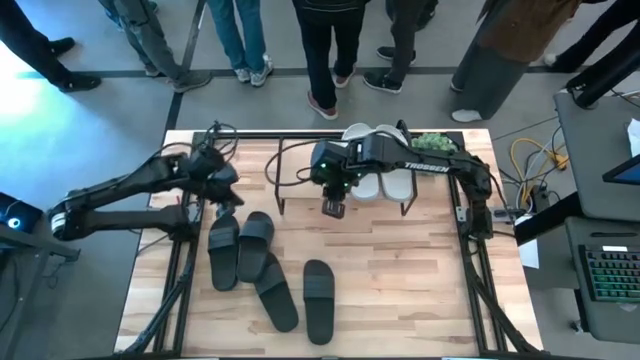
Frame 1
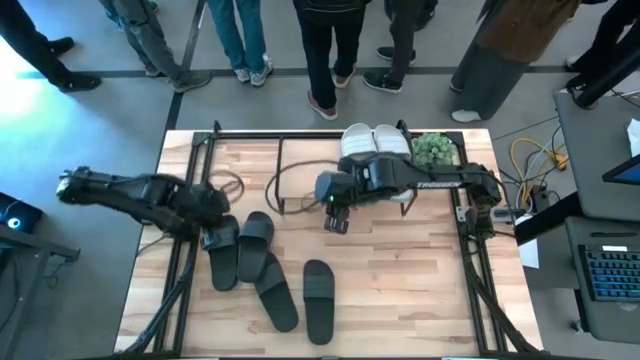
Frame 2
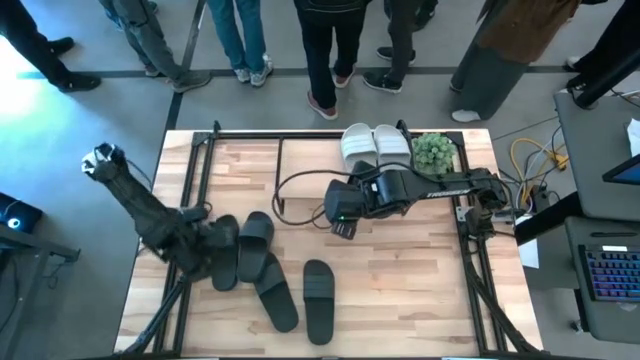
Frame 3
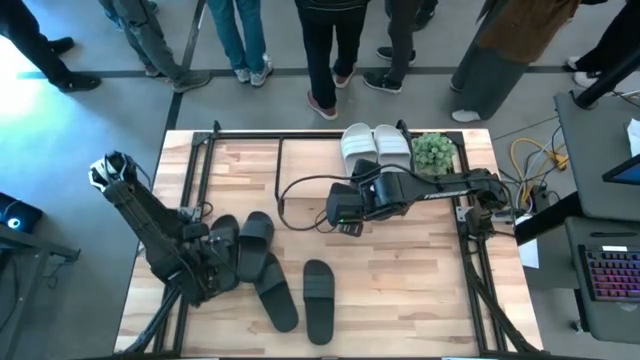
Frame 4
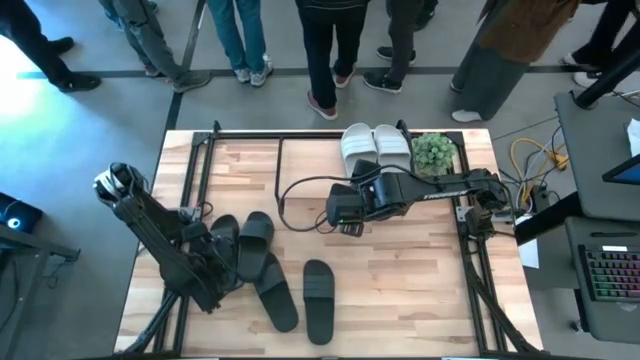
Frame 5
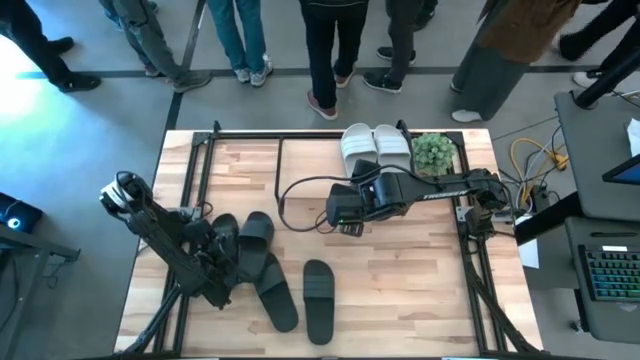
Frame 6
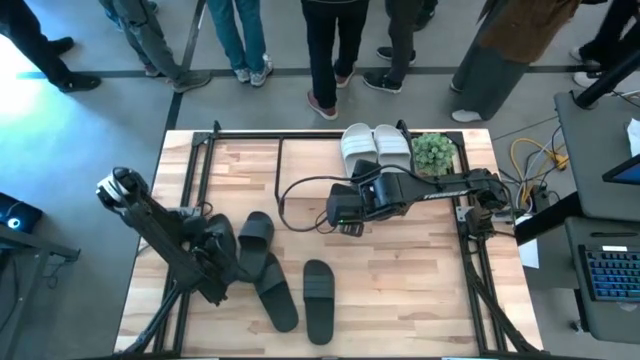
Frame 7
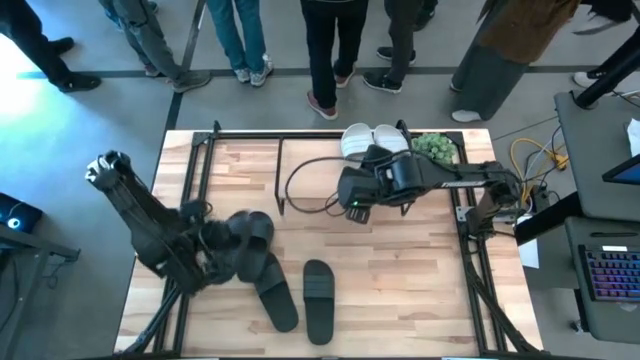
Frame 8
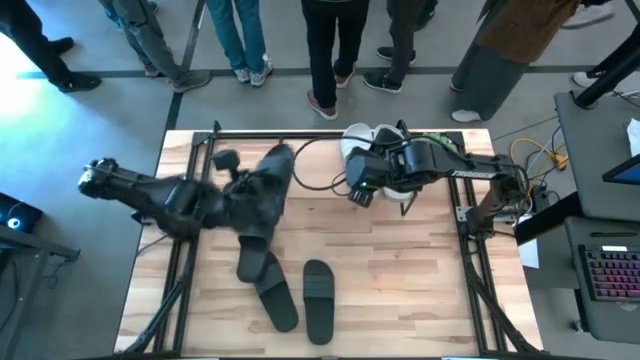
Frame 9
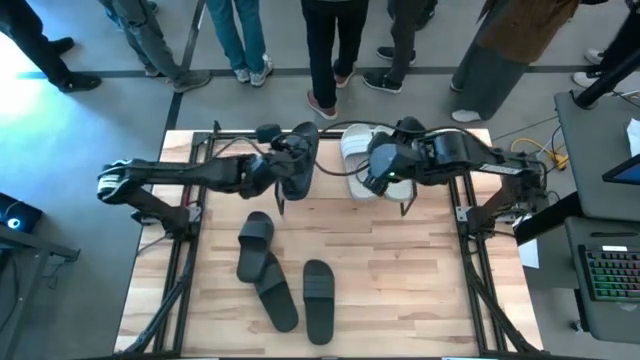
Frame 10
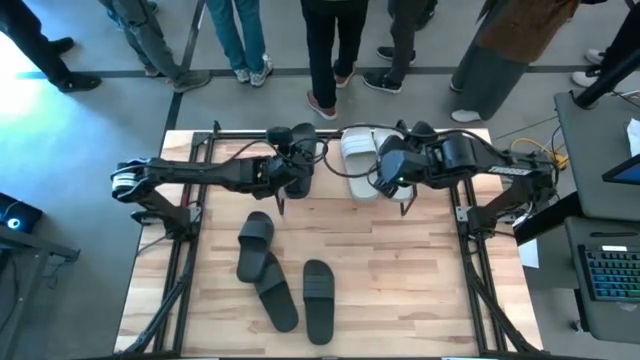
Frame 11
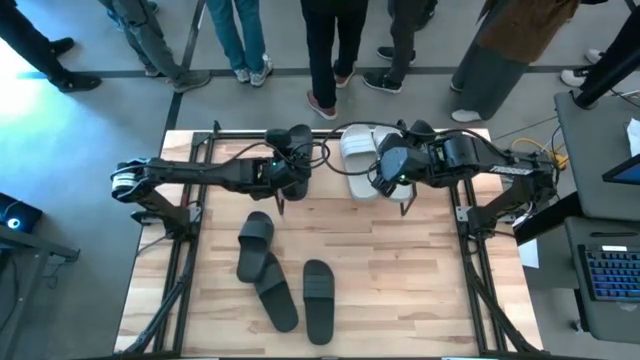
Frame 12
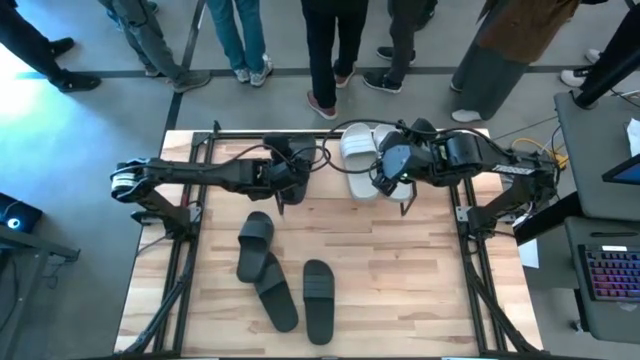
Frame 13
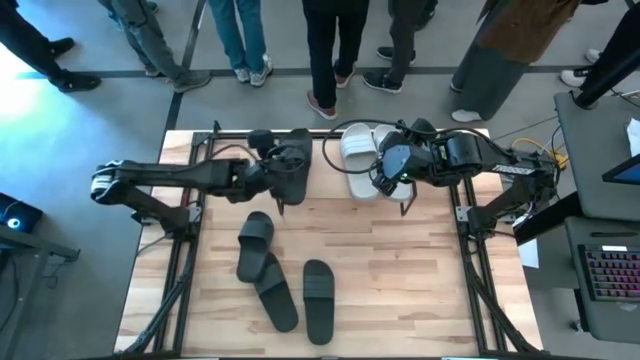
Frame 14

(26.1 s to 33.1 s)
Task: Pick and place slides into the shelf
Put the black slide on the shelf

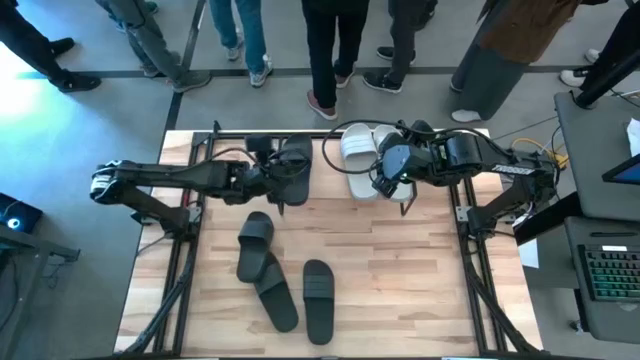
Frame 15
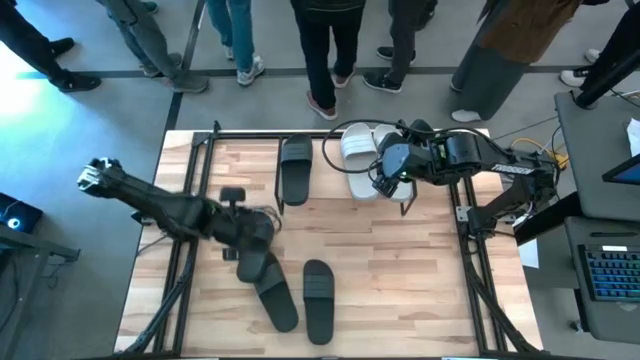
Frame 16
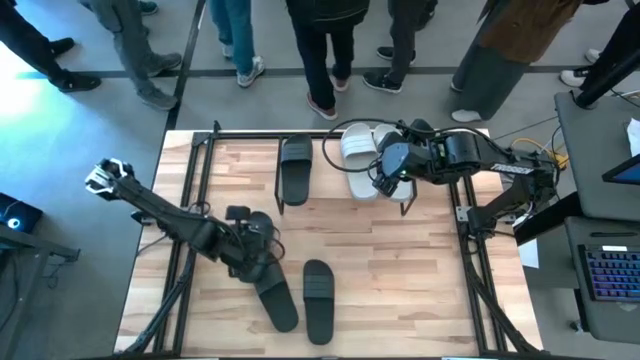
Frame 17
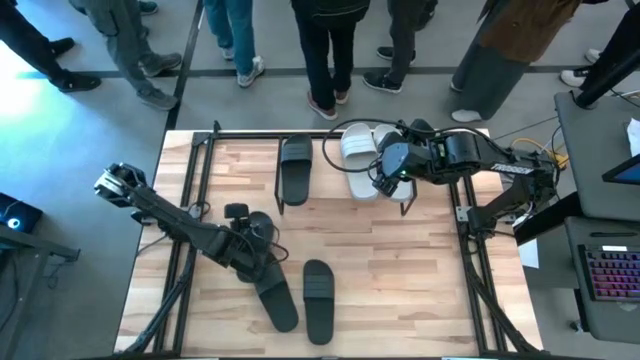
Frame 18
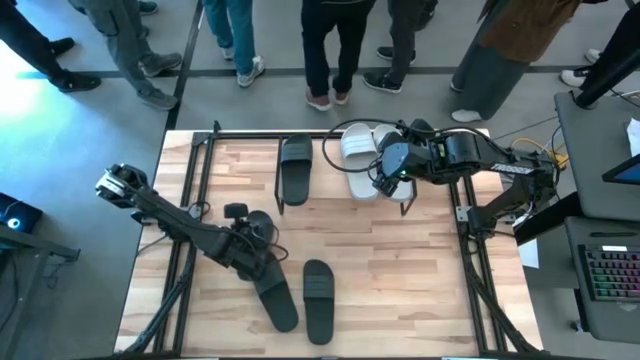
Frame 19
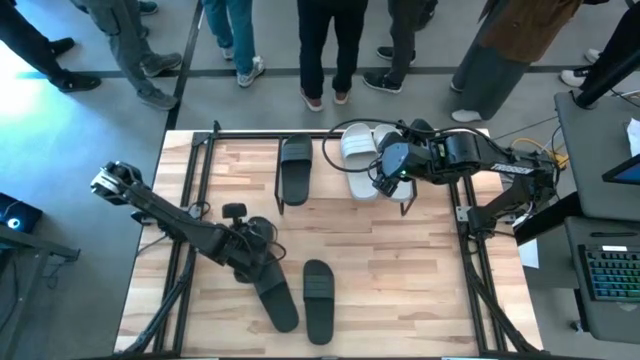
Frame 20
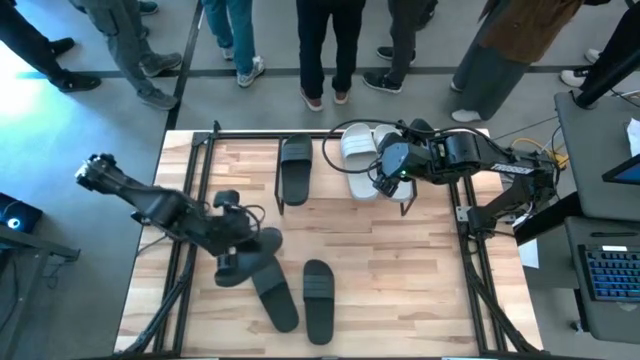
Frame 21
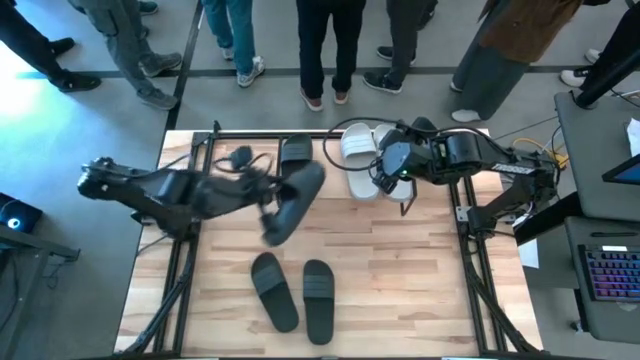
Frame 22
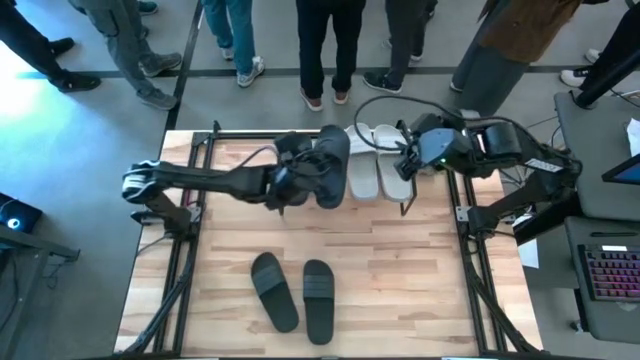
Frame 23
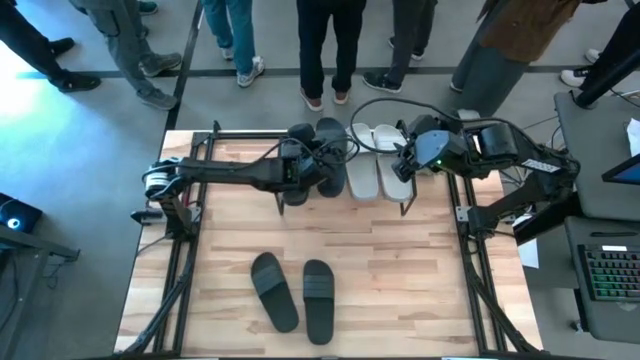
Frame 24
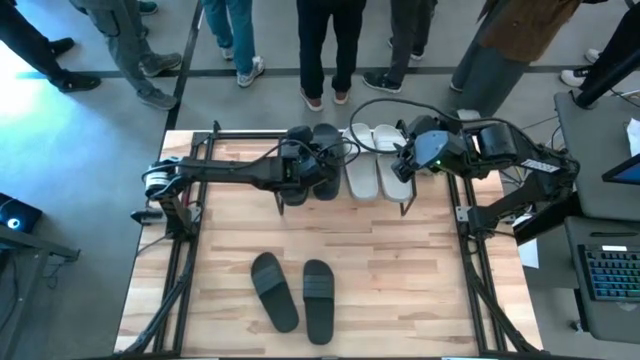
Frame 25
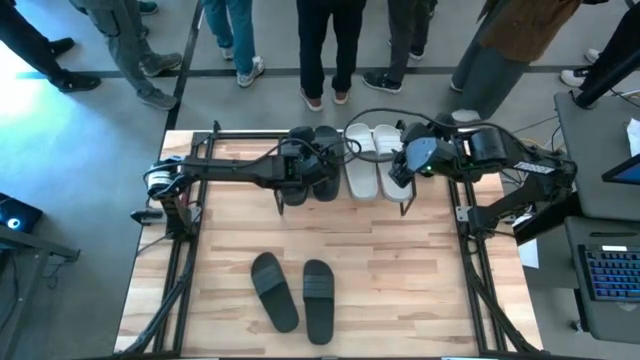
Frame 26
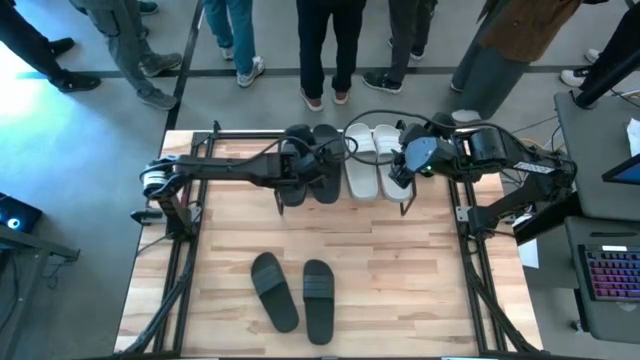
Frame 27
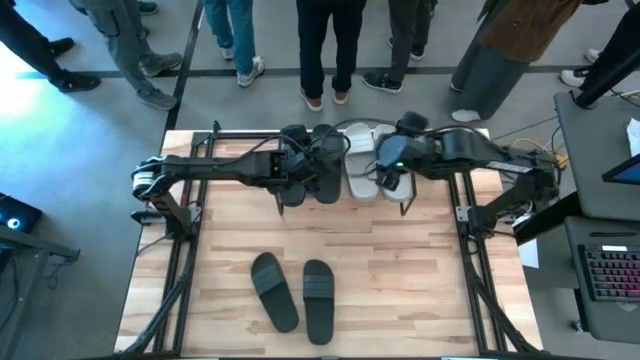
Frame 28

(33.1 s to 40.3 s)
Put the black slide on the shelf

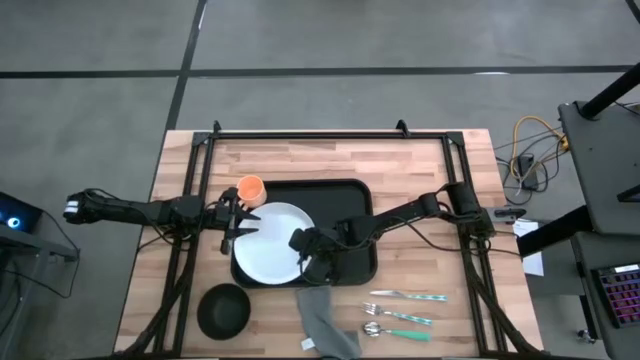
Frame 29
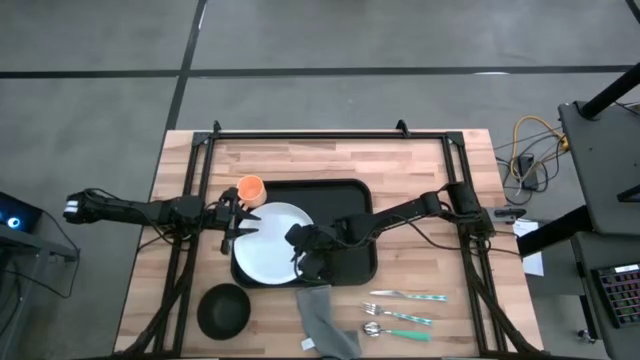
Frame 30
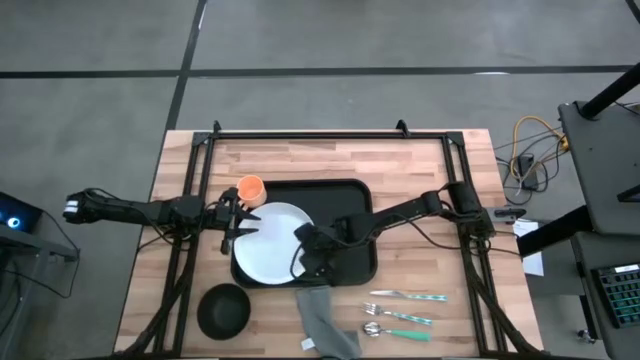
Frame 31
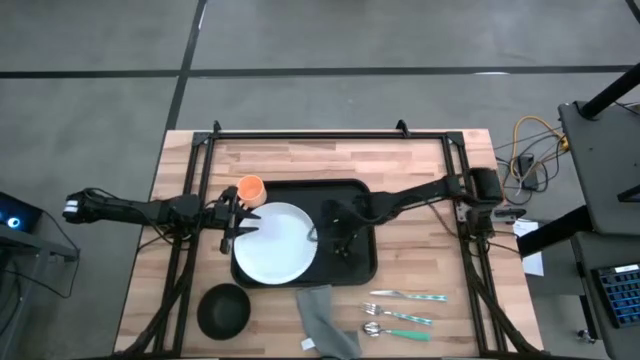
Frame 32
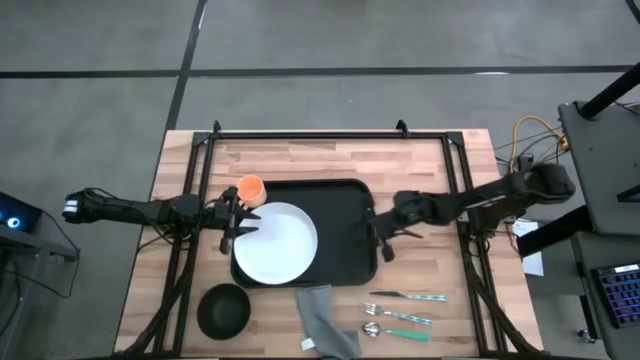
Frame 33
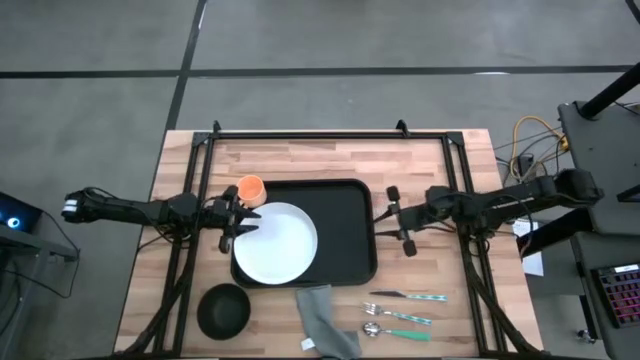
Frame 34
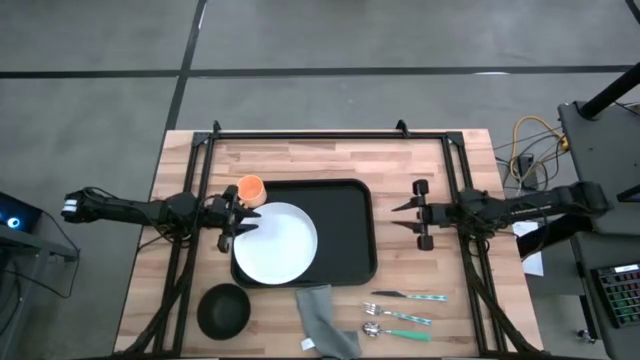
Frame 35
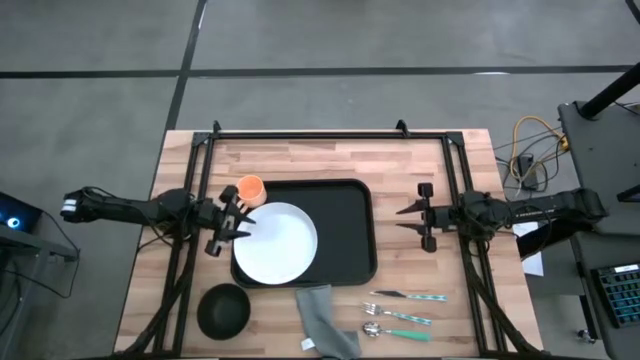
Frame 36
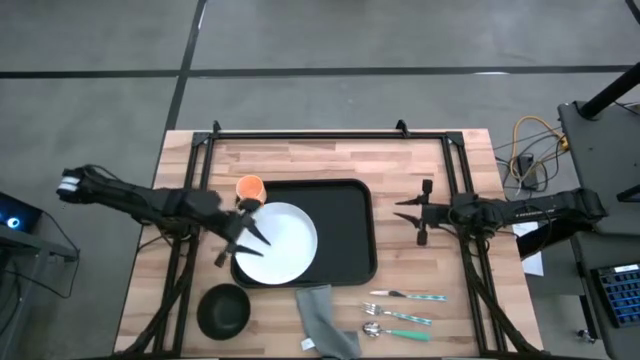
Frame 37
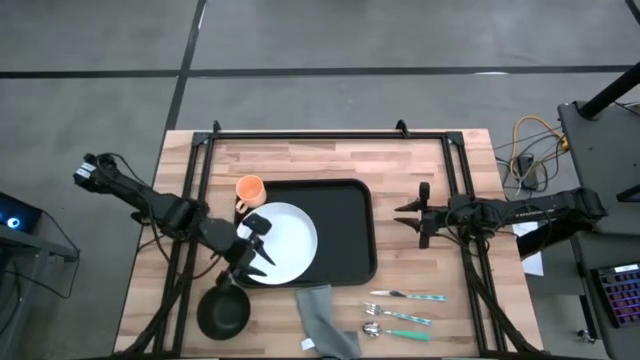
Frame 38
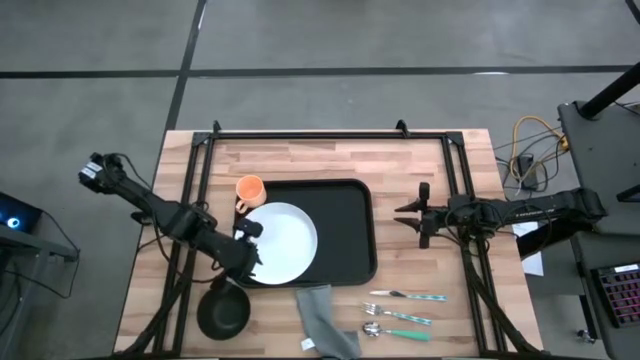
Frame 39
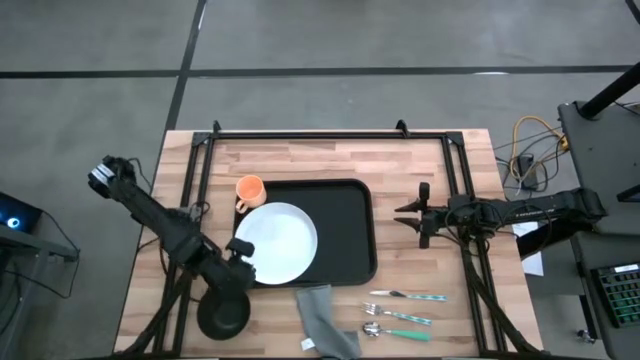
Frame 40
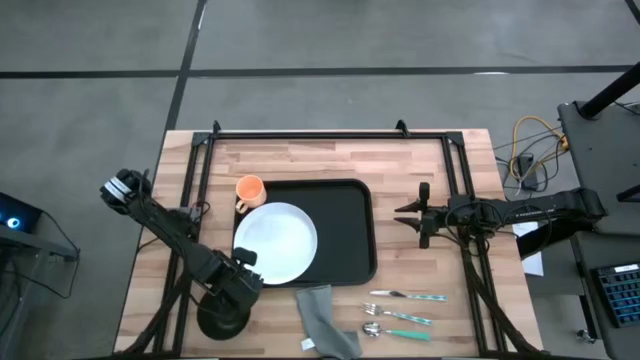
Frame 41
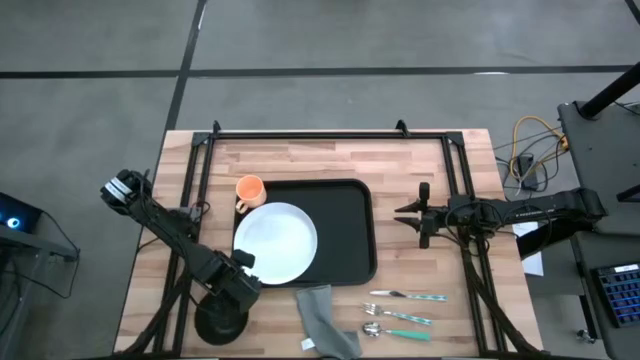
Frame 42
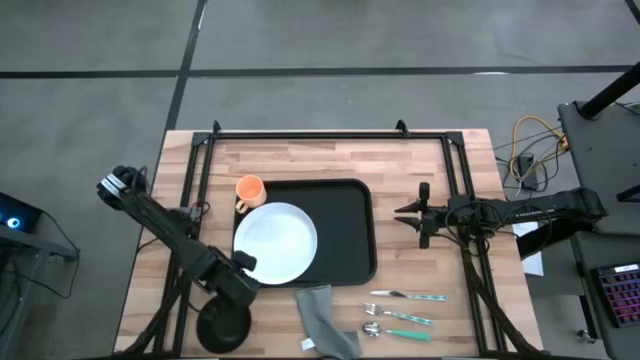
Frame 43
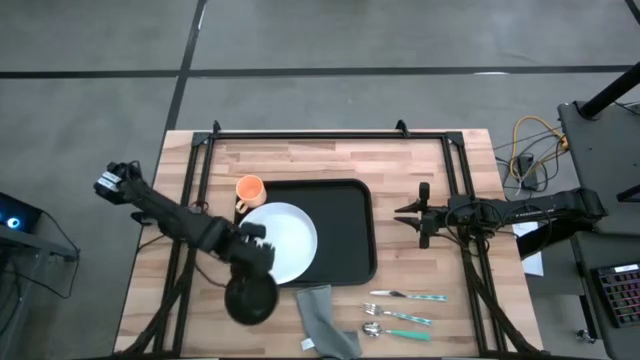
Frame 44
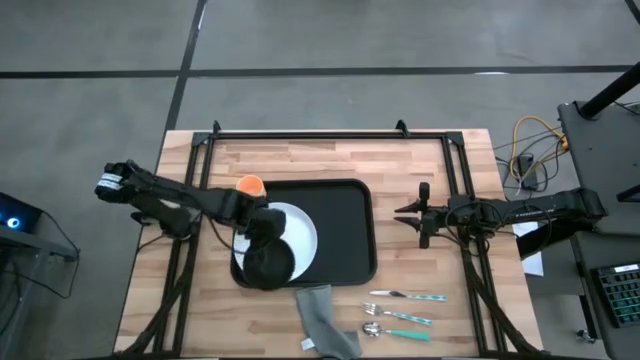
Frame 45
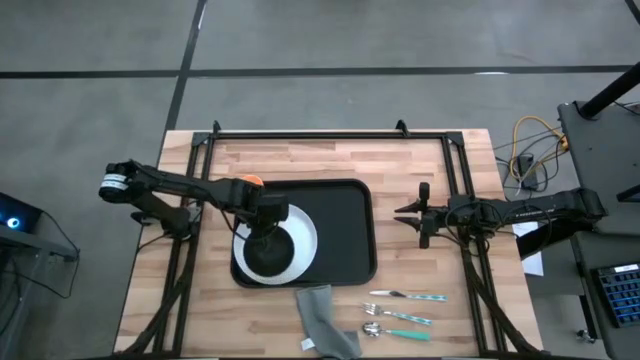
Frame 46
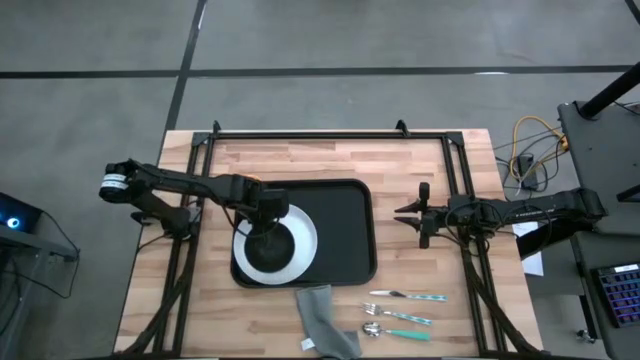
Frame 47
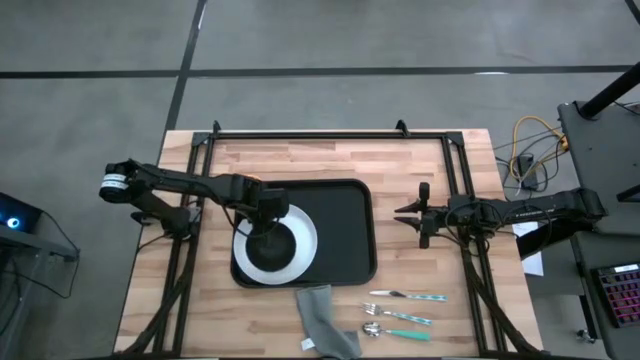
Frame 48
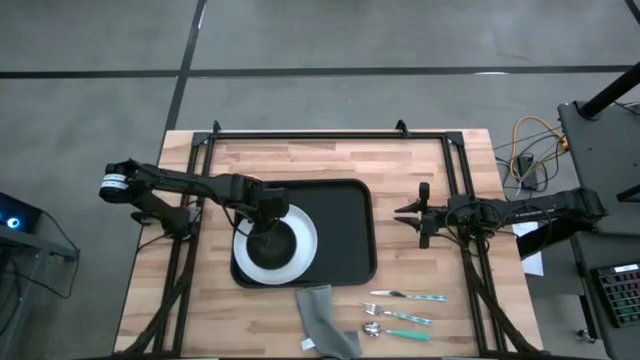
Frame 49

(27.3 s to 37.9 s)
Task: Set up tray
Put the black bowl on the white plate
